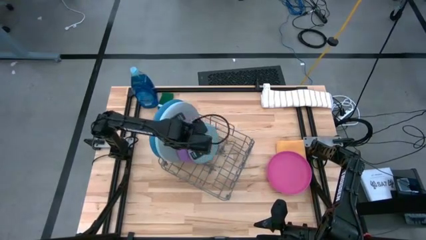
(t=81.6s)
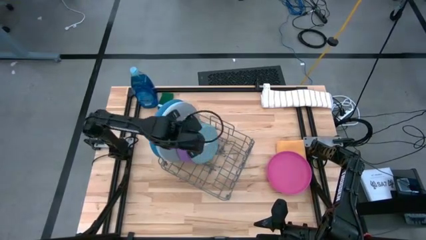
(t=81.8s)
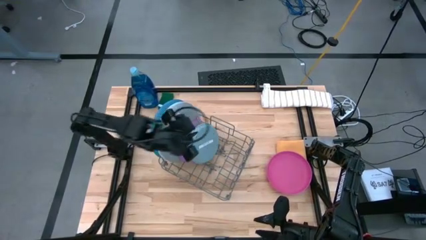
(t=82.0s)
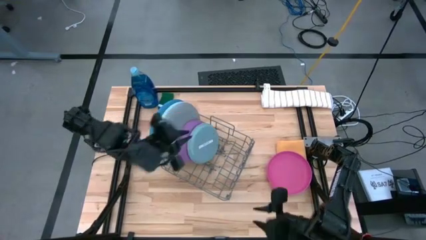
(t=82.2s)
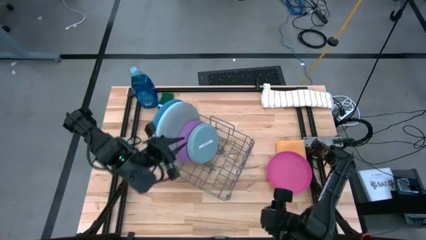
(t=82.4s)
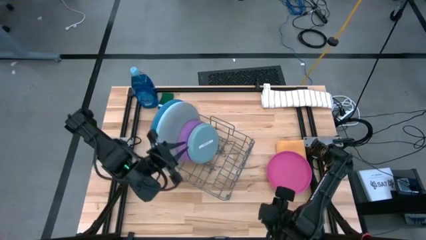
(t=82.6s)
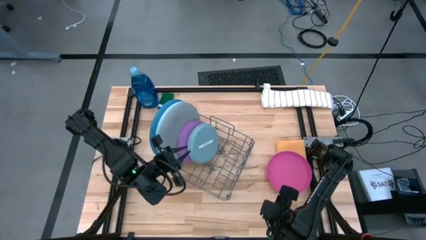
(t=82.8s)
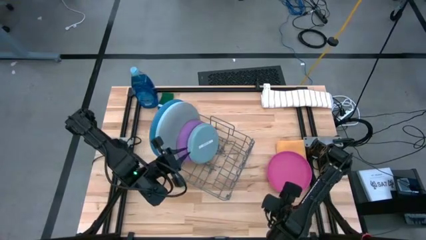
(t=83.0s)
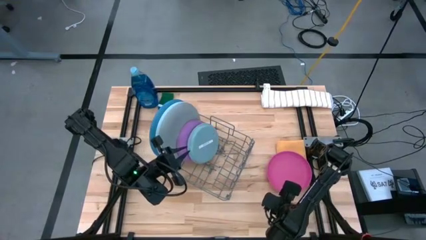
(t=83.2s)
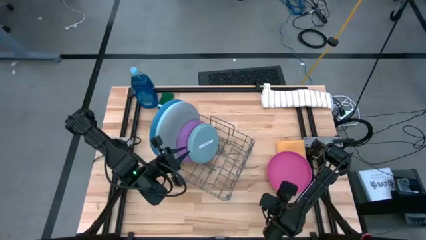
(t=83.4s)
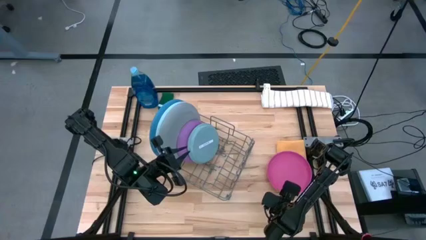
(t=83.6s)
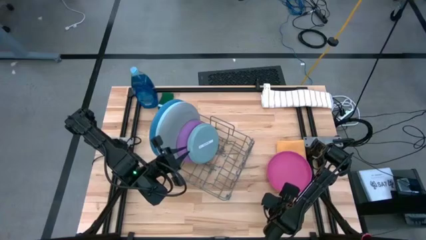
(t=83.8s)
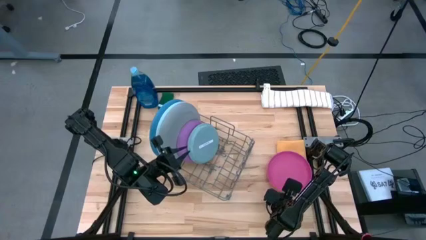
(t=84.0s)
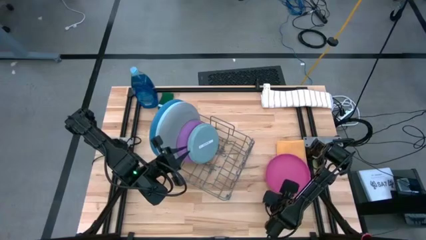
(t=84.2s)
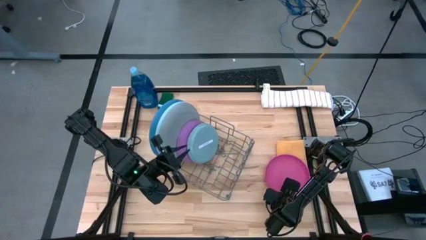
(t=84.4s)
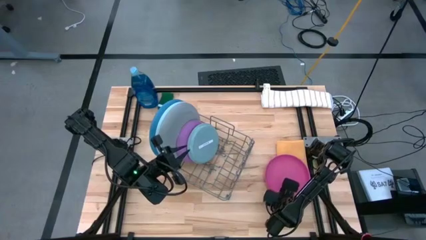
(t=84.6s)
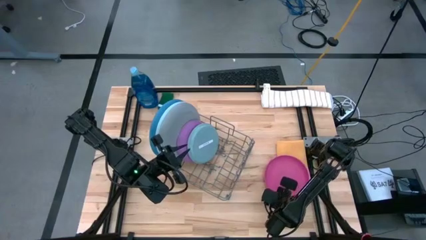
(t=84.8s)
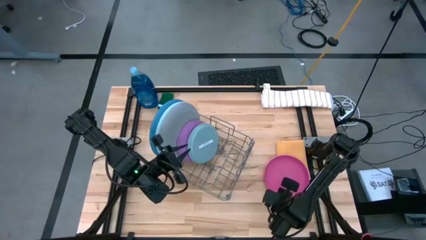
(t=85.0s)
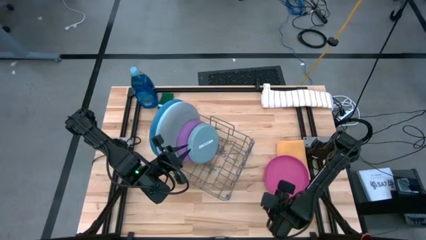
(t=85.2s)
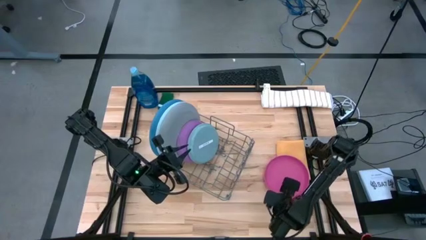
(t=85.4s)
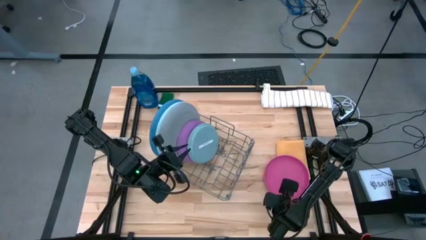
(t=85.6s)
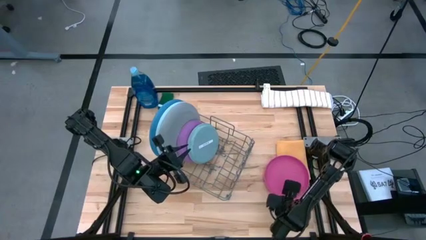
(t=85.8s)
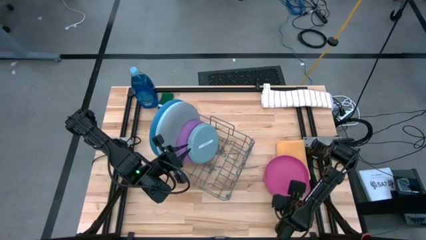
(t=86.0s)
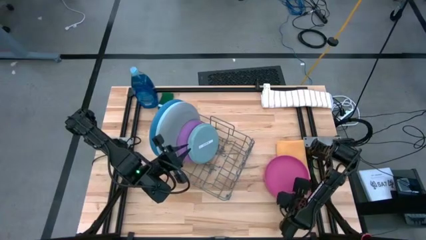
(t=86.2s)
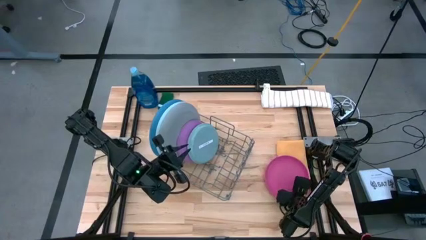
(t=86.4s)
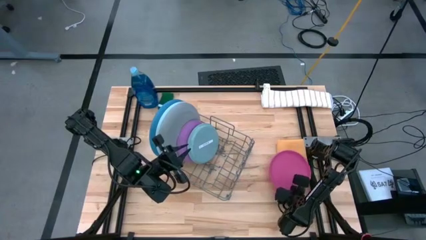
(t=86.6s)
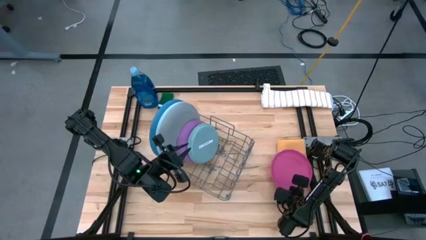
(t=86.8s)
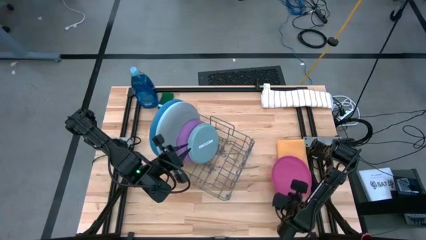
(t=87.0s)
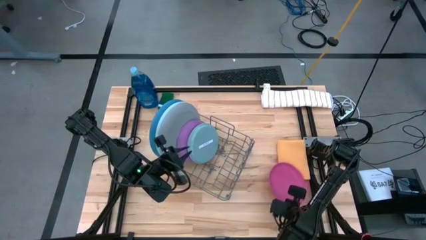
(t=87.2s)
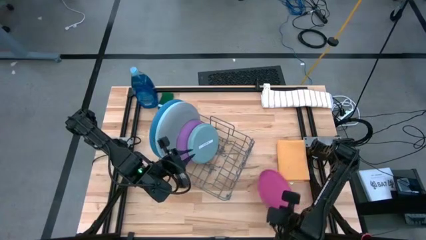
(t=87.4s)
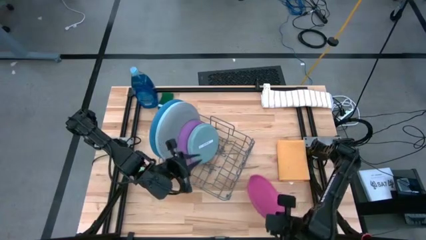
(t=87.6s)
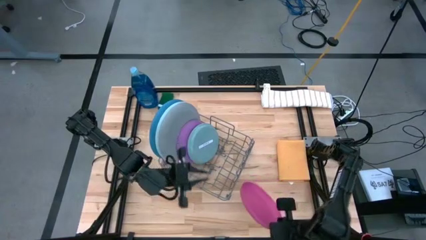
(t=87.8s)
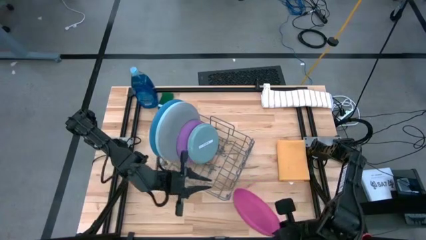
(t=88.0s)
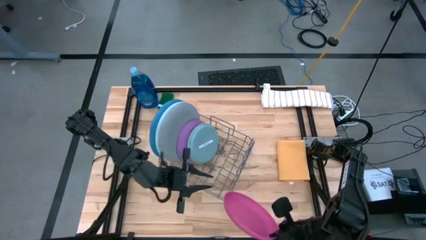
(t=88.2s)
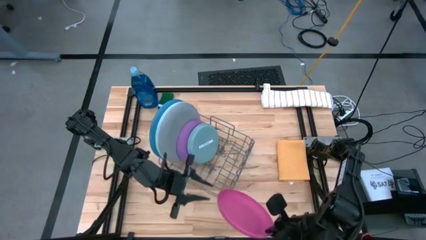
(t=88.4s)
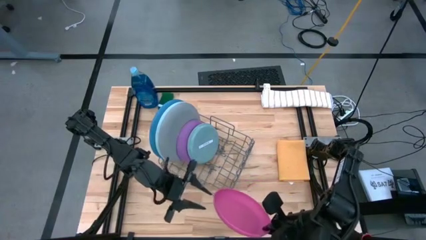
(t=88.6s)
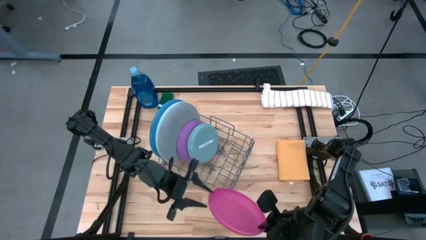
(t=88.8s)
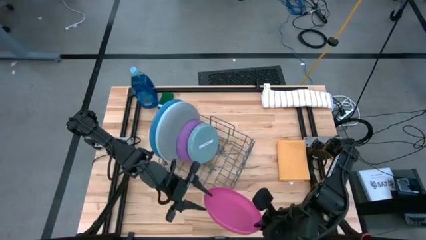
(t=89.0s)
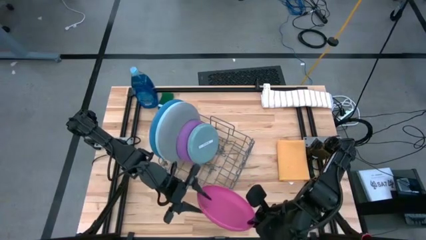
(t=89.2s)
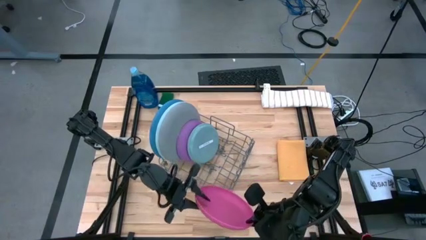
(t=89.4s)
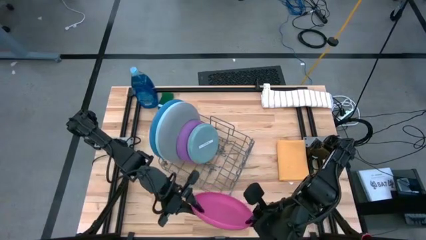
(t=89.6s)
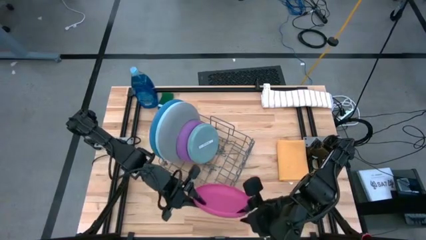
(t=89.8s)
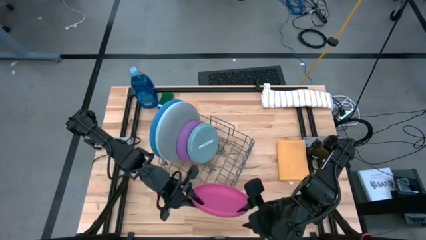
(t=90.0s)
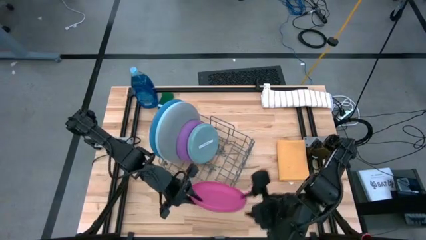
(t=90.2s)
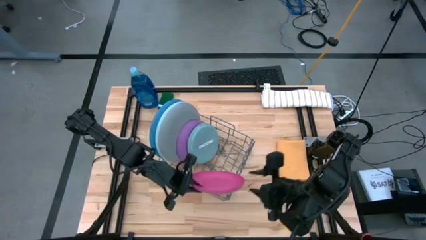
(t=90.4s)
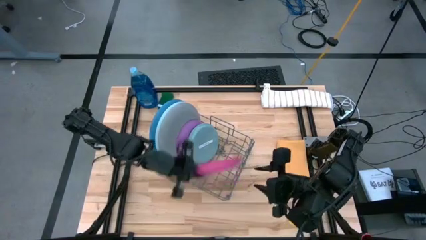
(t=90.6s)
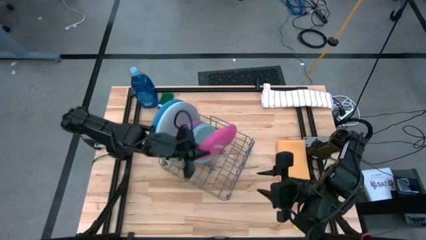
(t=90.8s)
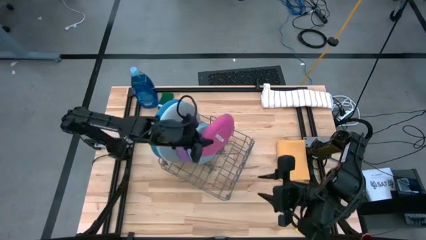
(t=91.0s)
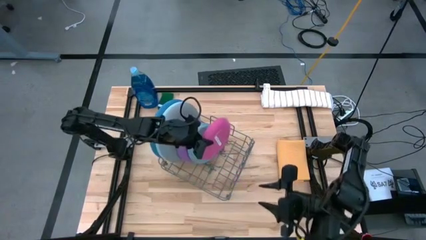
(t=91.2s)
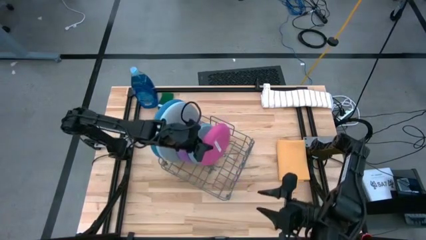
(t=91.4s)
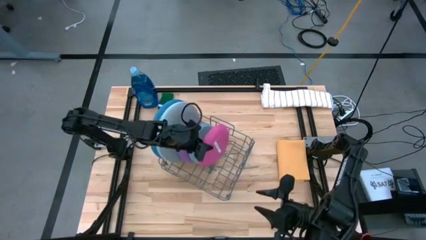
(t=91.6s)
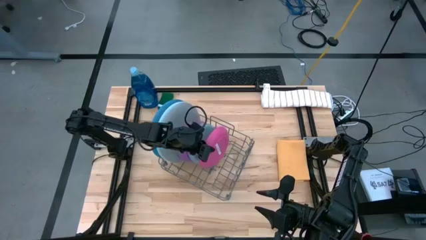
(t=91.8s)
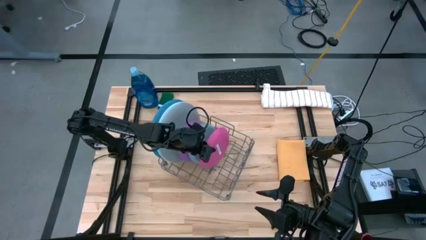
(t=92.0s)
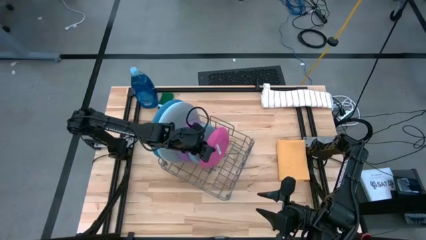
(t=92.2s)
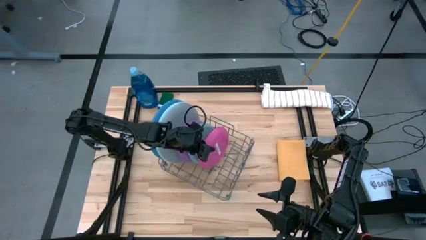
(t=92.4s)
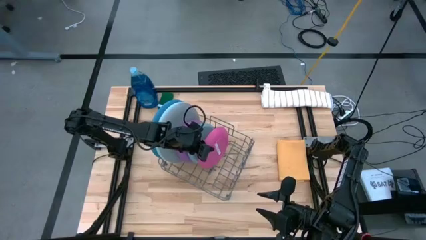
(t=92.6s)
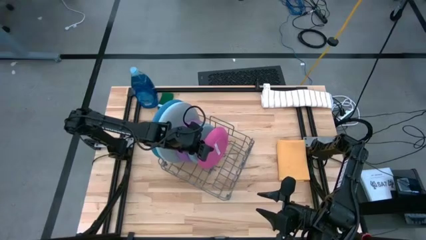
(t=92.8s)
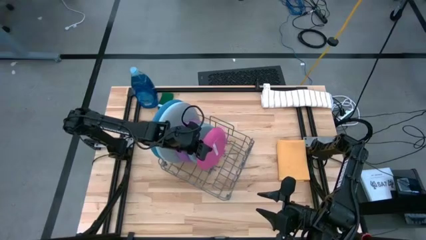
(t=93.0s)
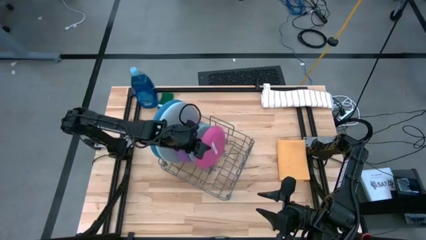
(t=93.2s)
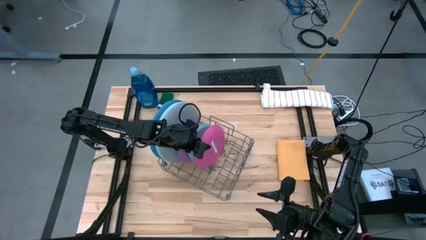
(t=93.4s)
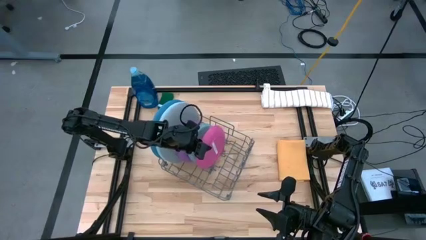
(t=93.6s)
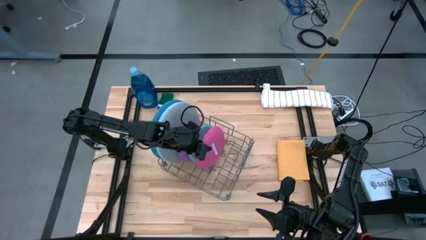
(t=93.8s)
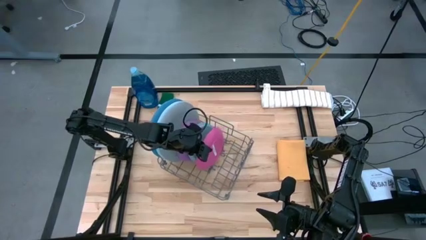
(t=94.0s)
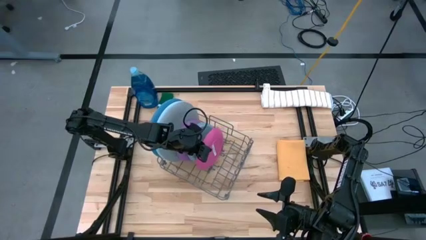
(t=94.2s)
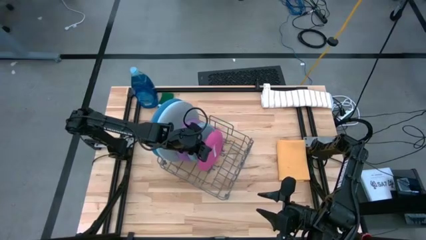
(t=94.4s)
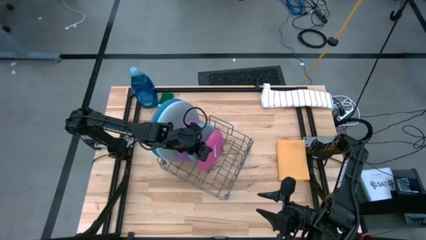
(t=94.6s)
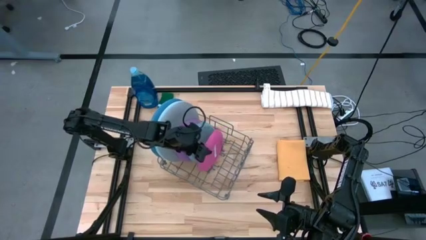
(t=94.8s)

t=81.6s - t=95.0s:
Task: Sort dishes
Put the small pink plate into the dish rack
